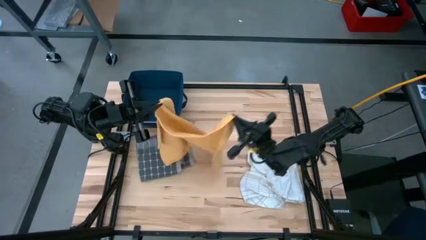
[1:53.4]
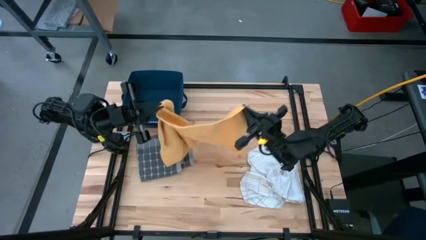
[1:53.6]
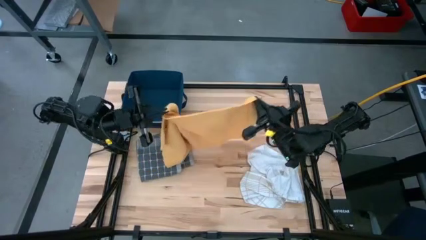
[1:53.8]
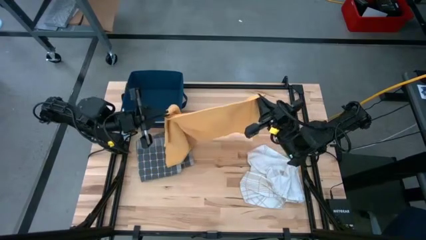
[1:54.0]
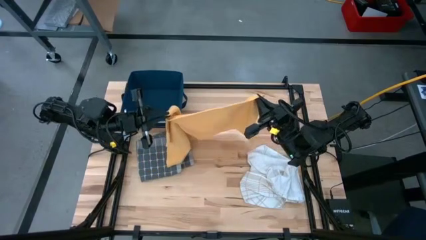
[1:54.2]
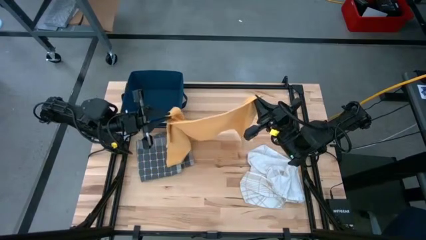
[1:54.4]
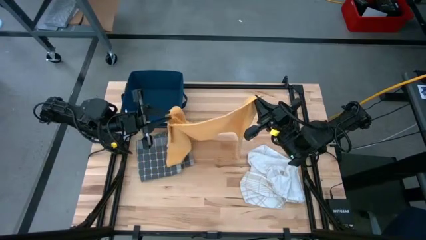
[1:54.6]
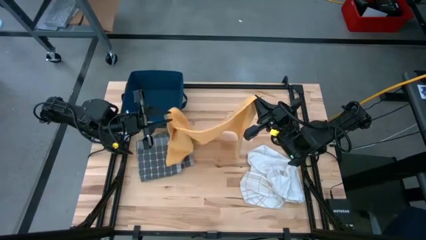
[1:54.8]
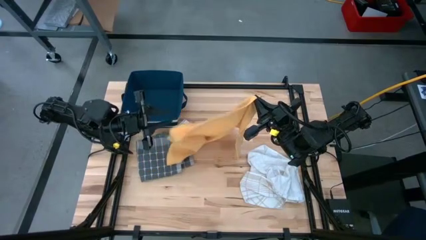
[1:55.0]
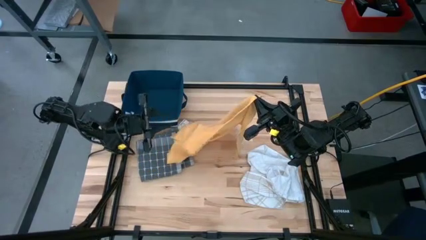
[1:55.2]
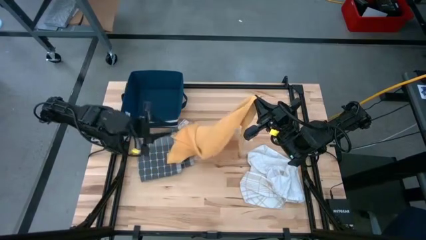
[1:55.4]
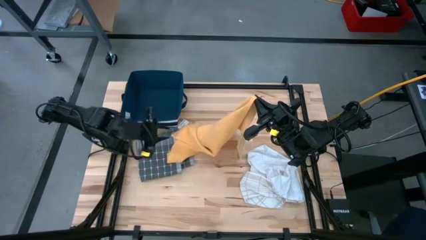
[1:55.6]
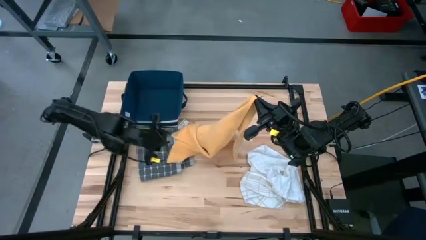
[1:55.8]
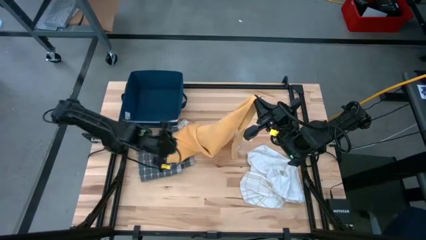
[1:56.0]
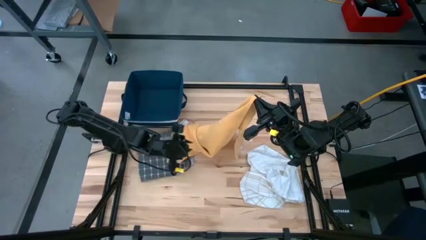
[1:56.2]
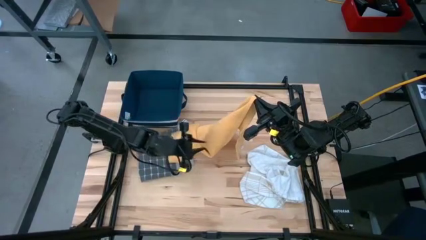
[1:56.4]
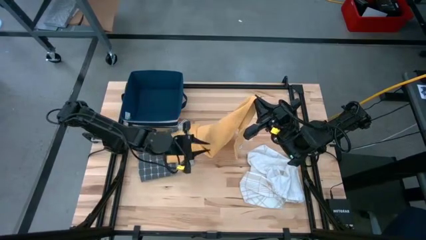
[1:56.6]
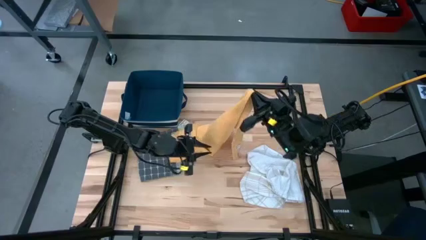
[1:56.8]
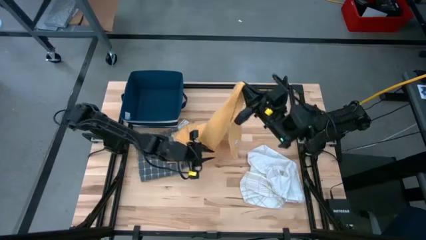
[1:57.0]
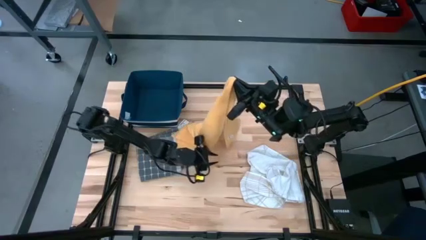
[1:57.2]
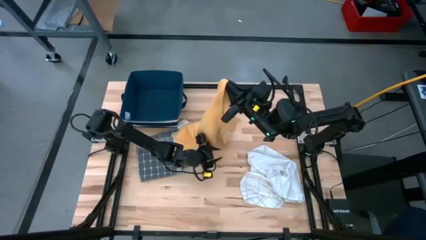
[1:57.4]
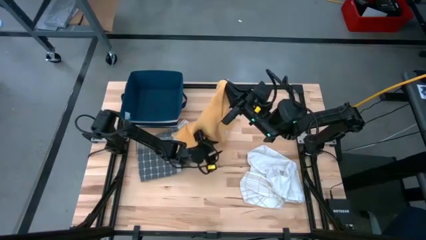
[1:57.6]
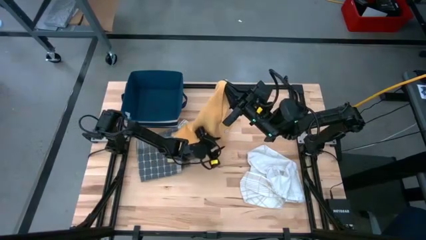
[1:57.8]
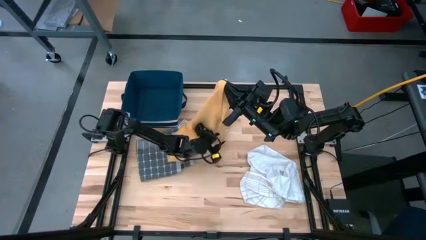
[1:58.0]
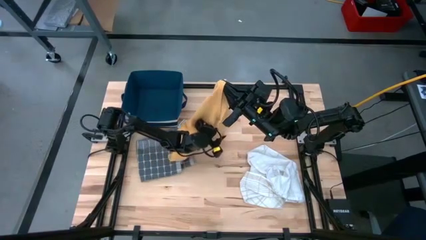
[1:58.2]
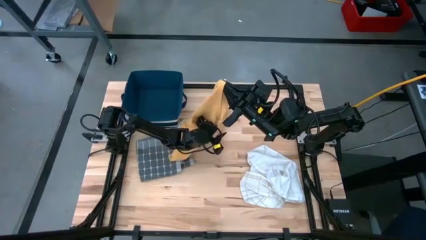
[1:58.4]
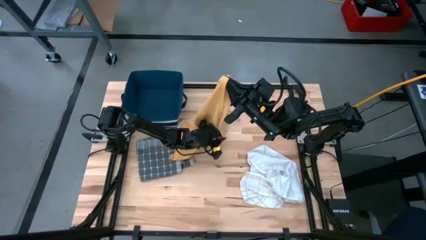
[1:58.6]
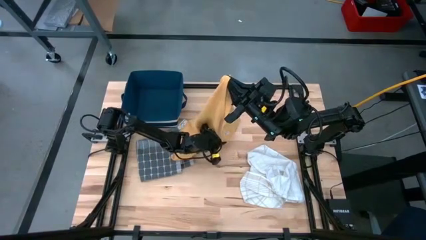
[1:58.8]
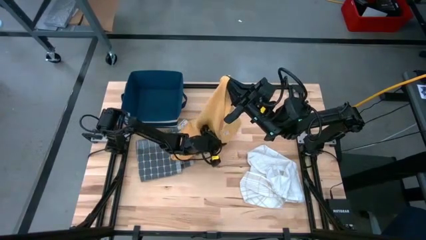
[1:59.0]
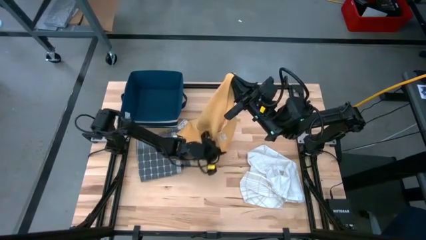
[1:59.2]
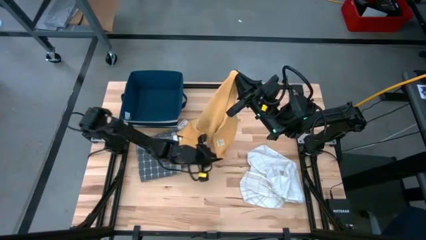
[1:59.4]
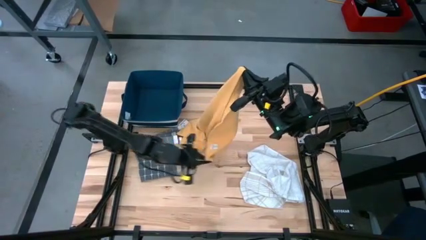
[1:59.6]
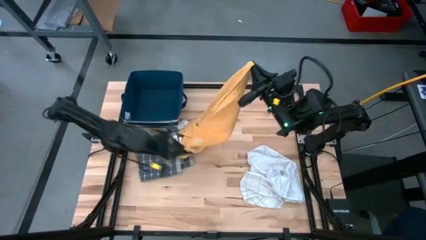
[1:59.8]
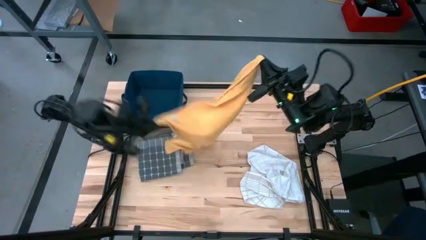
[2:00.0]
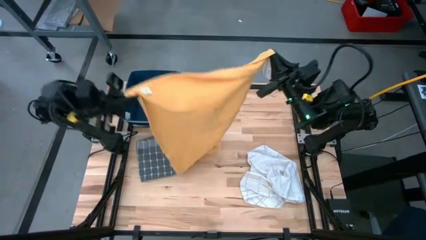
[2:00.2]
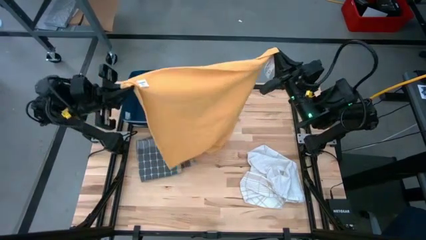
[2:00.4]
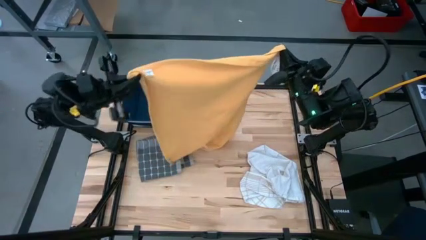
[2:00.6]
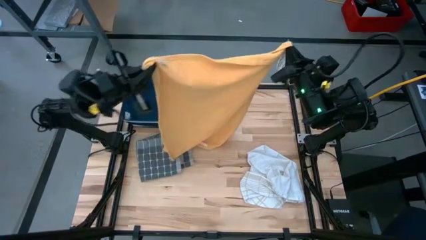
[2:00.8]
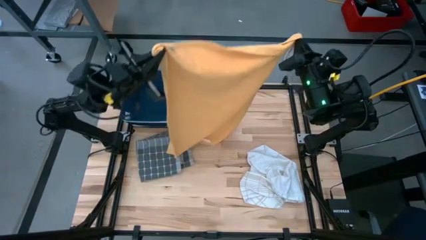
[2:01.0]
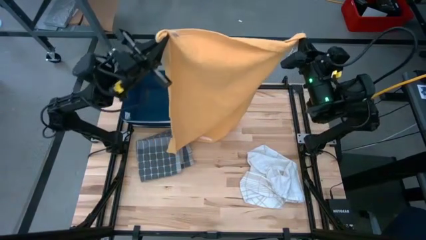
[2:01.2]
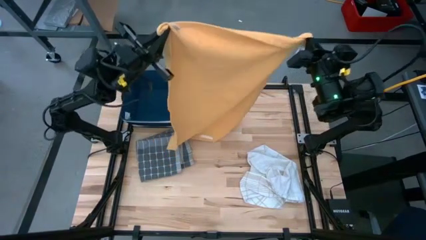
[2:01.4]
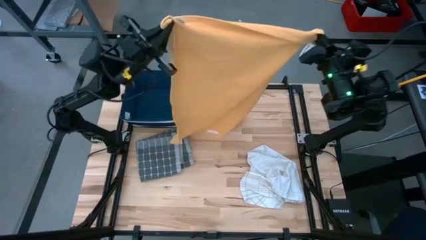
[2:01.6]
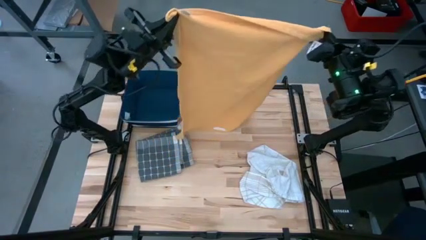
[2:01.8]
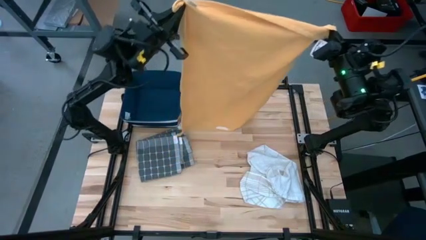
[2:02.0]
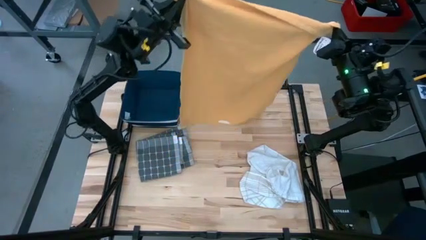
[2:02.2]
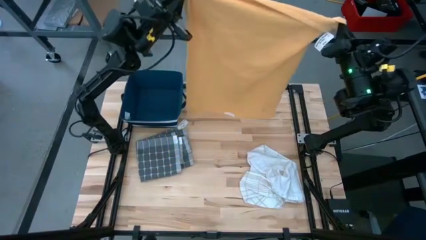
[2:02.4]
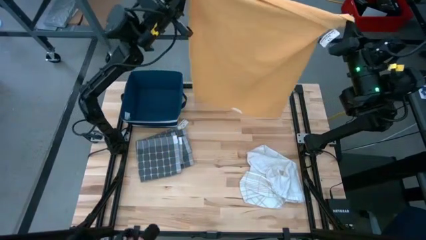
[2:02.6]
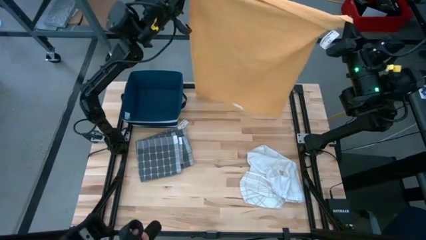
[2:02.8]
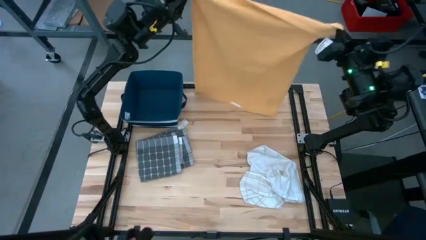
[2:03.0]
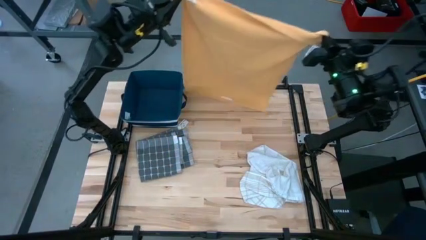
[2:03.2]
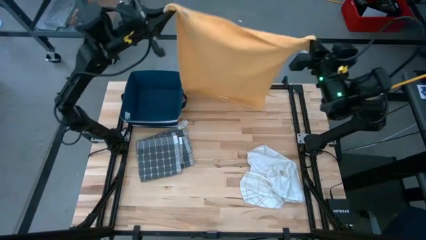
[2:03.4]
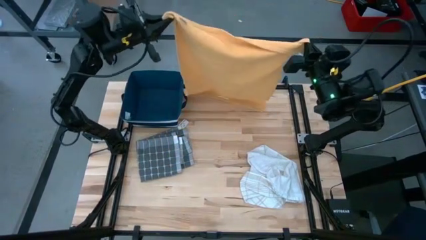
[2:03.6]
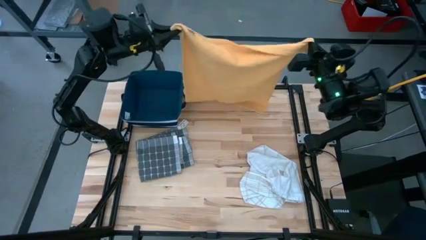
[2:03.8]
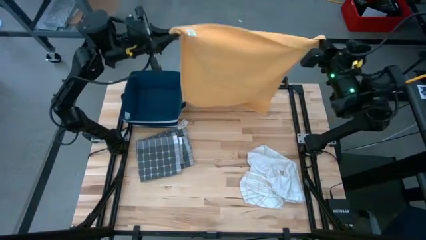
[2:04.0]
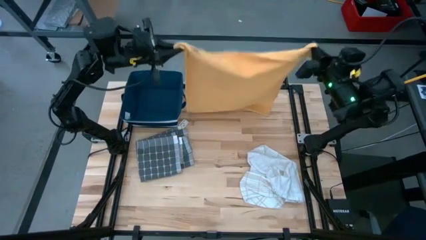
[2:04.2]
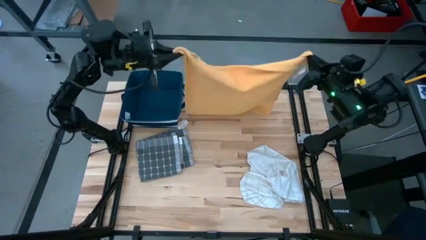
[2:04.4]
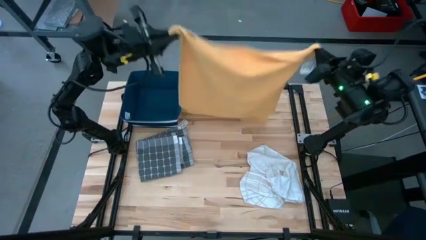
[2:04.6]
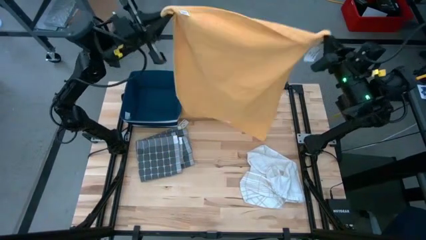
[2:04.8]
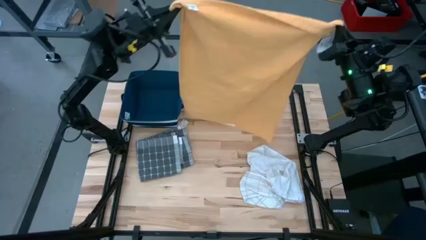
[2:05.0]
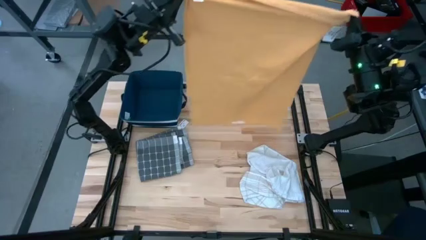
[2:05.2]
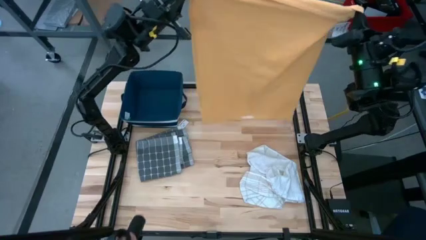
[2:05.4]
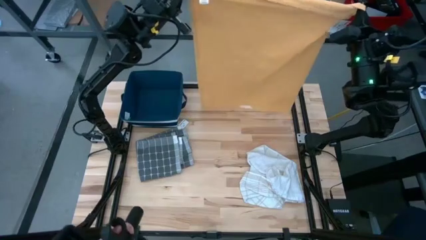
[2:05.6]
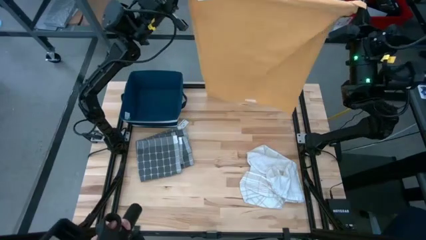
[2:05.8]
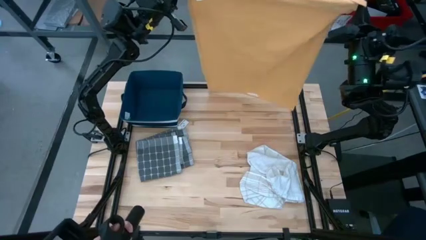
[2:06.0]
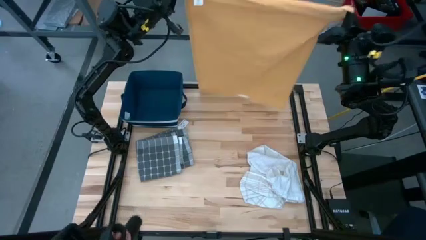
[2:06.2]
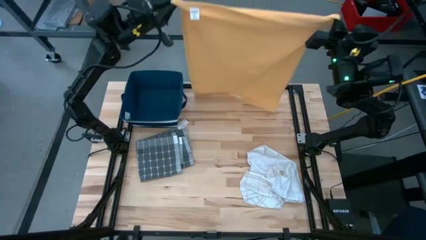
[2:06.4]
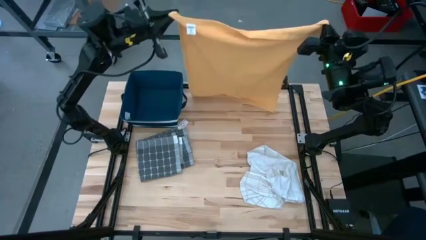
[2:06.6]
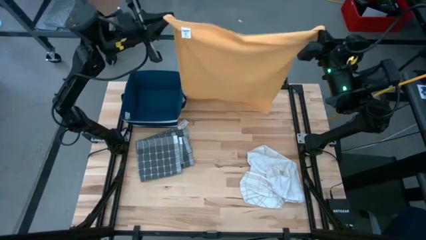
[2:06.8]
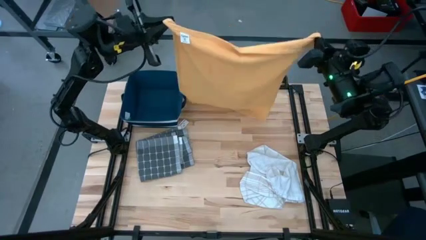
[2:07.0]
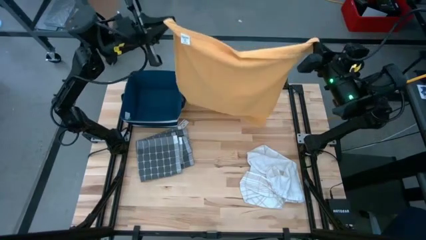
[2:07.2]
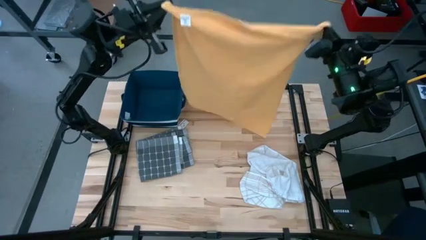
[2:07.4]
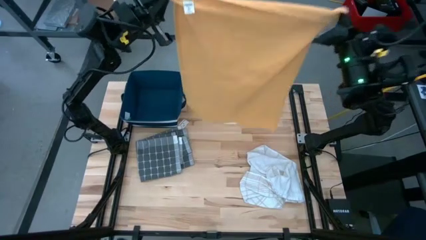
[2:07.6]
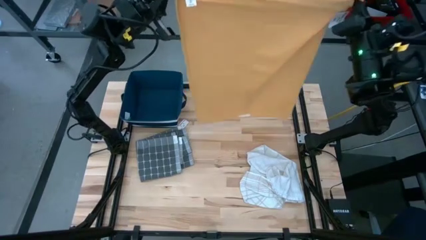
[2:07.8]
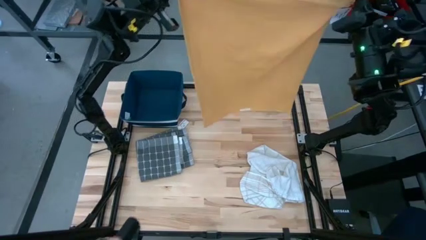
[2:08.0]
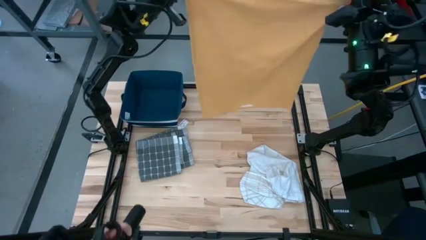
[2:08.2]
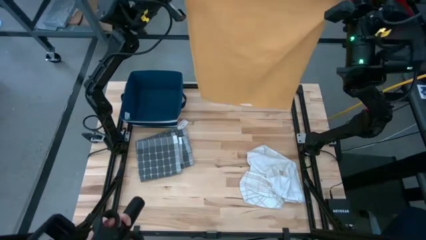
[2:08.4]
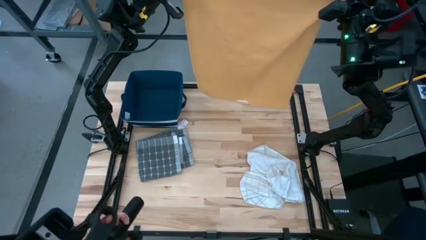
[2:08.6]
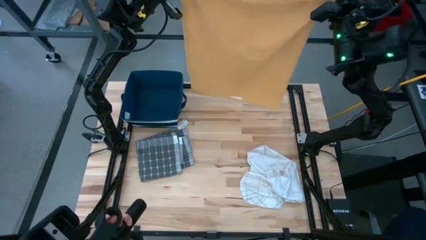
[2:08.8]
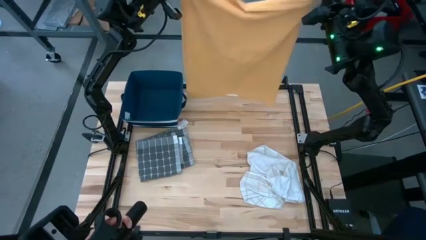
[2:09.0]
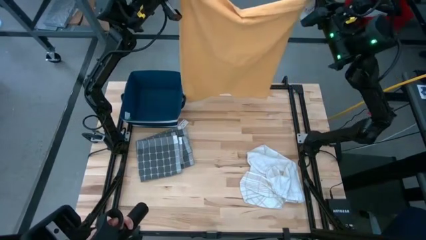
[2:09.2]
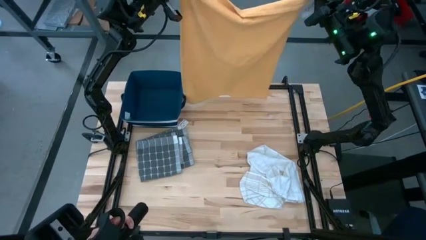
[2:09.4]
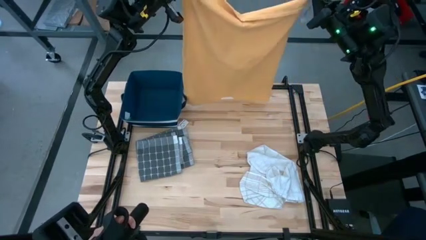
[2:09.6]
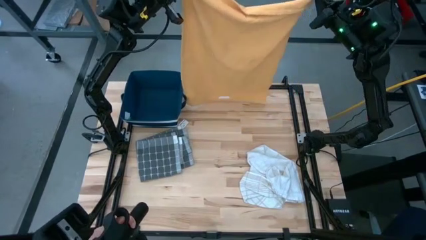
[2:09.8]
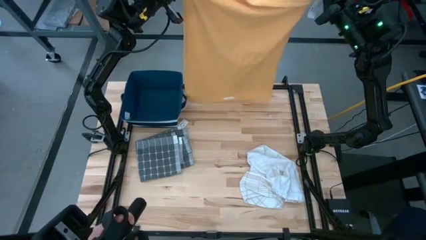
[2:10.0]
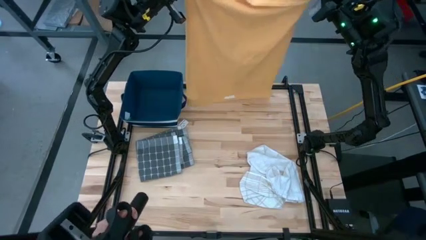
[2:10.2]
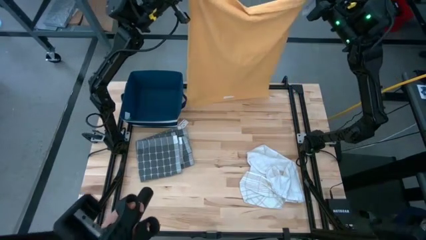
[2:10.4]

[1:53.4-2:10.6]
Task: Fold towel
Fold the yellow towel
